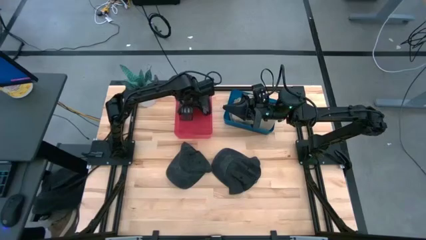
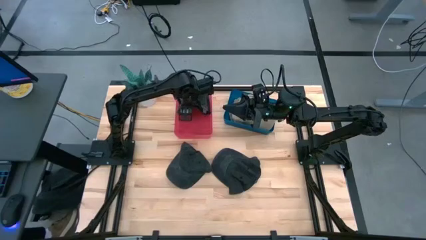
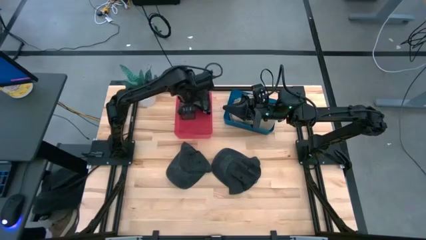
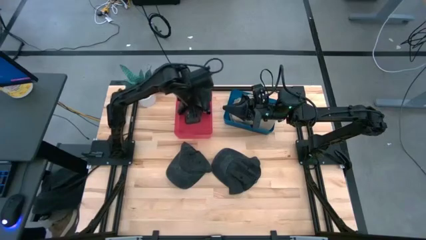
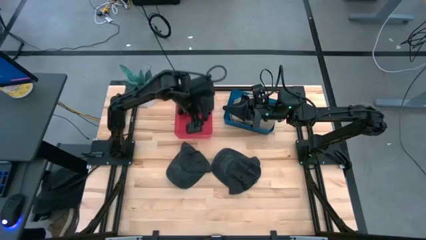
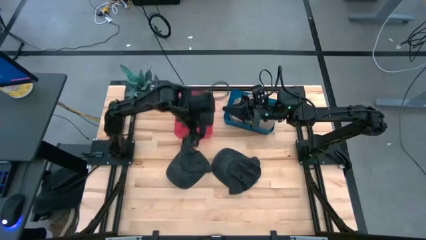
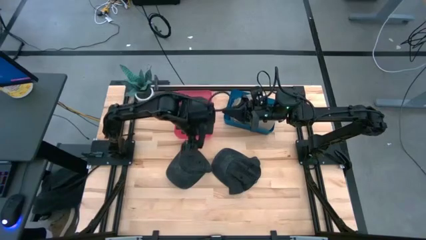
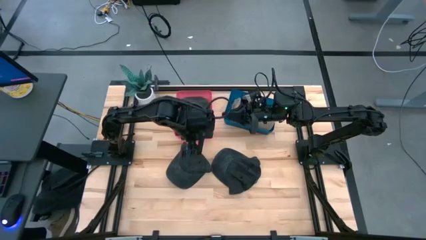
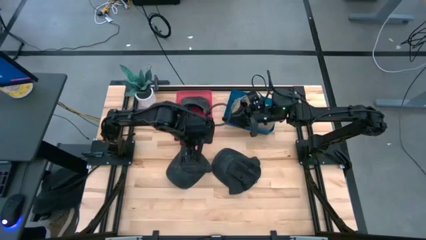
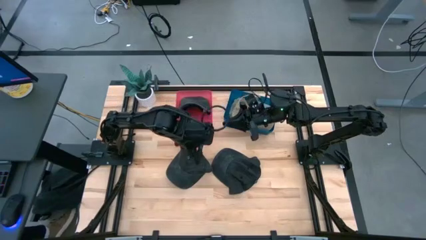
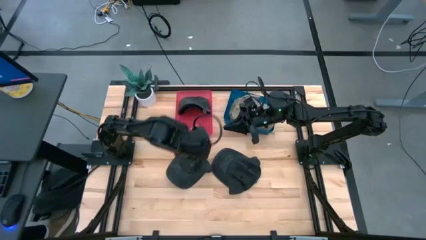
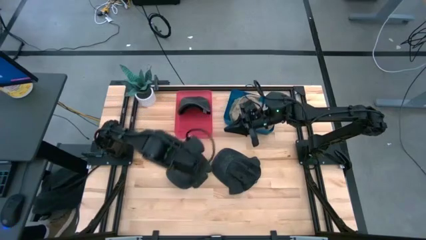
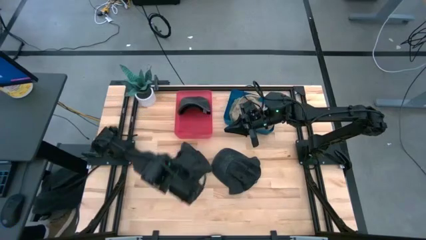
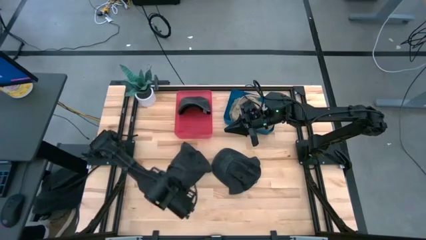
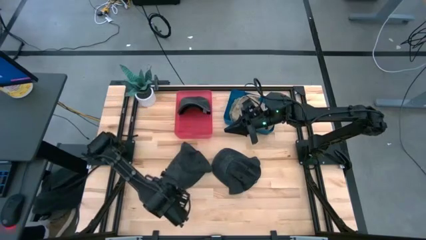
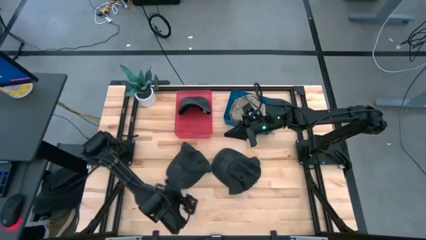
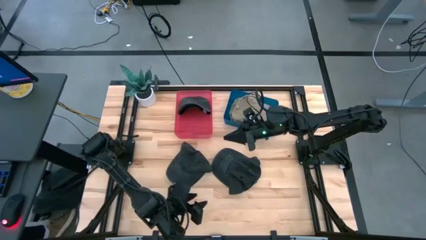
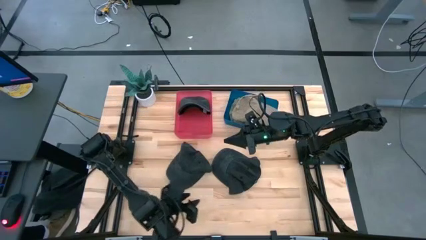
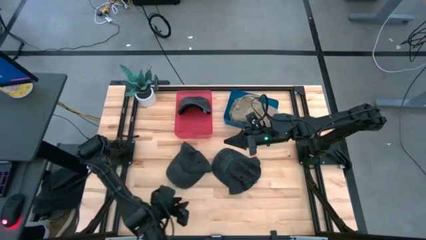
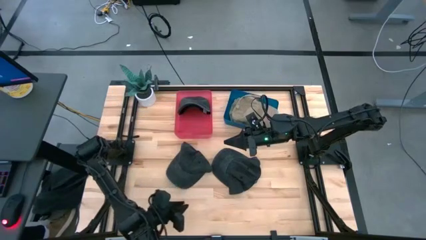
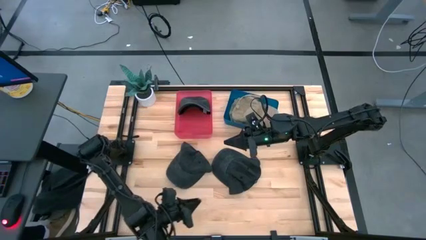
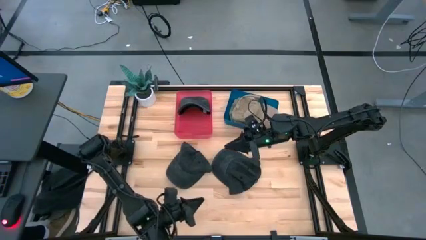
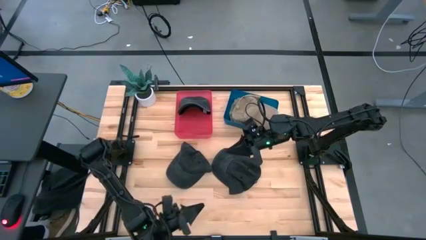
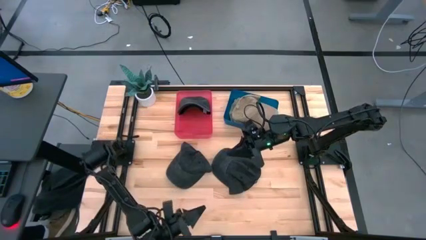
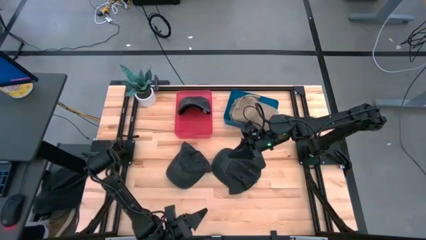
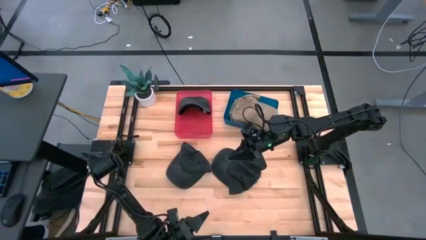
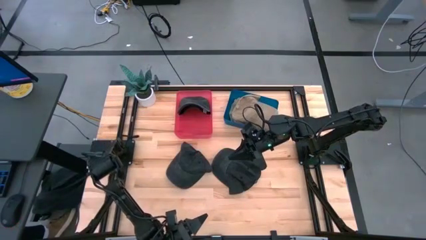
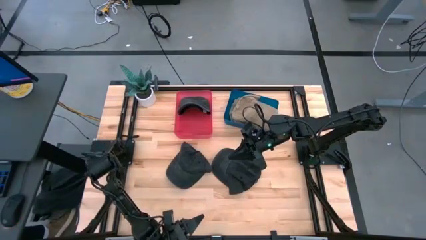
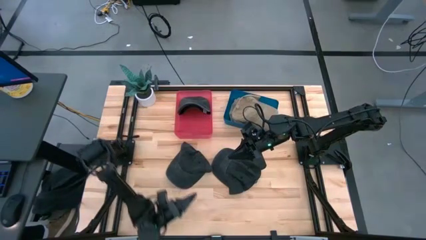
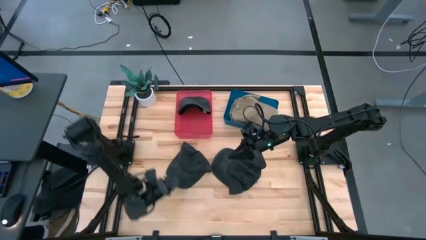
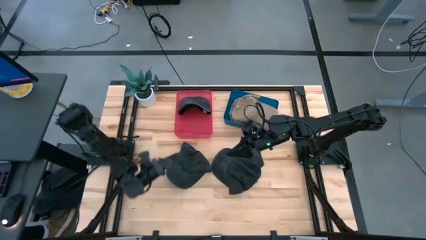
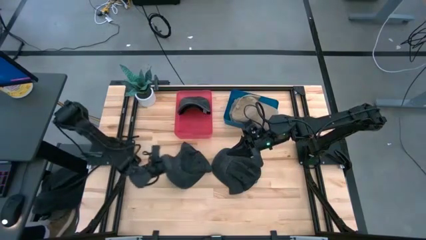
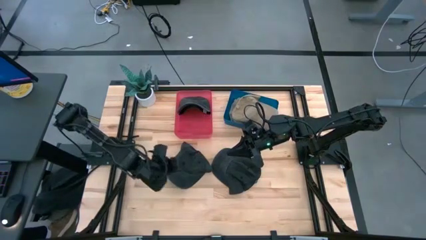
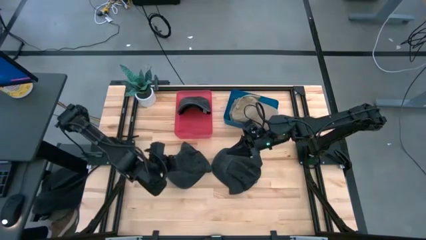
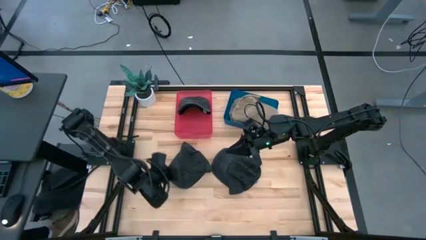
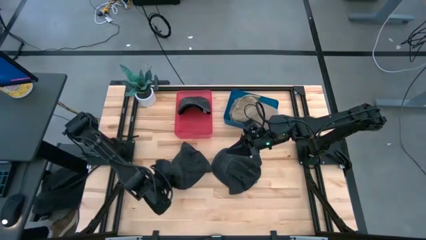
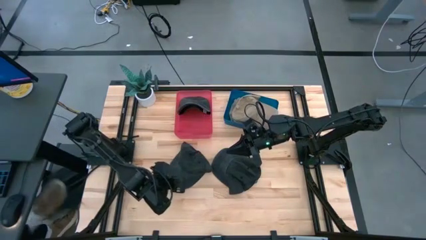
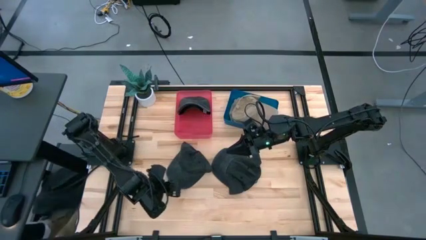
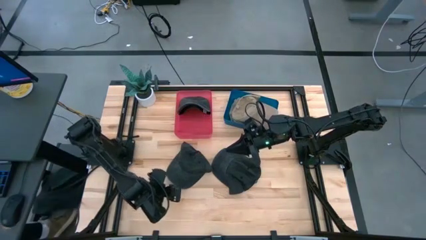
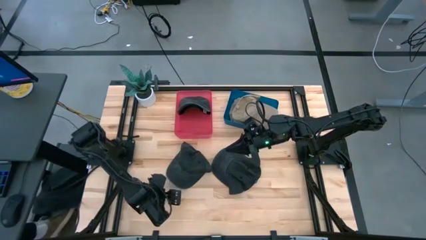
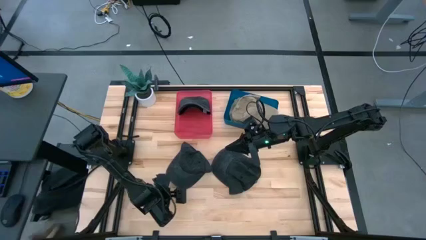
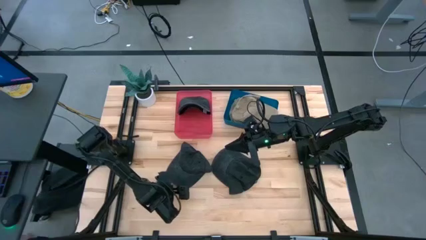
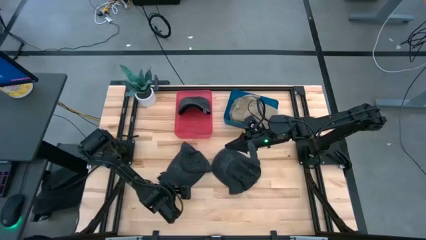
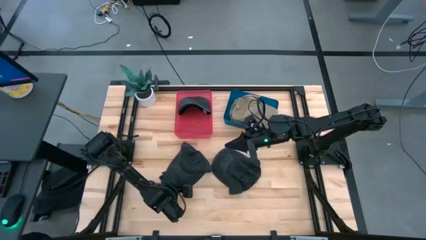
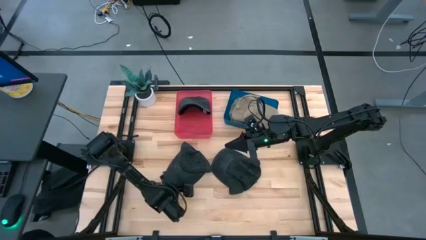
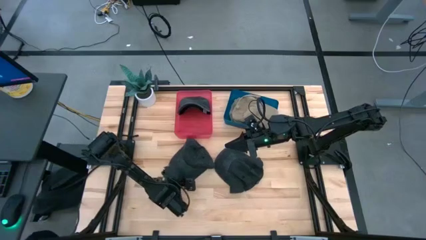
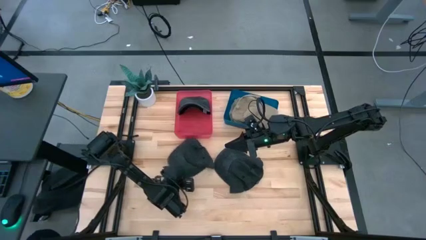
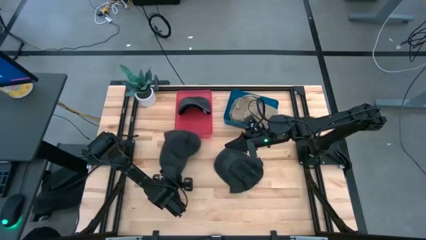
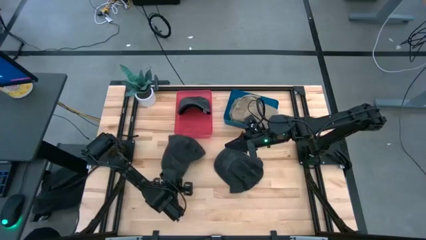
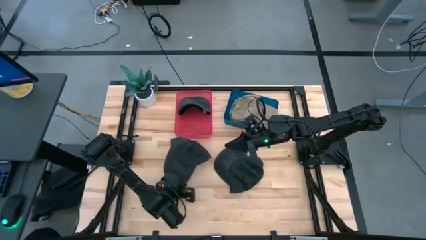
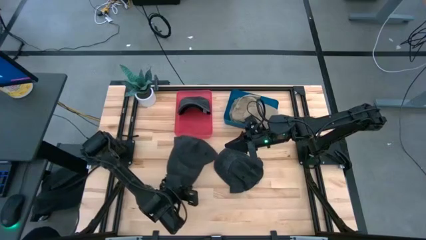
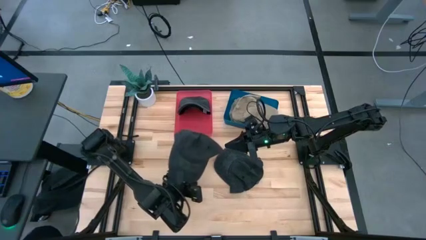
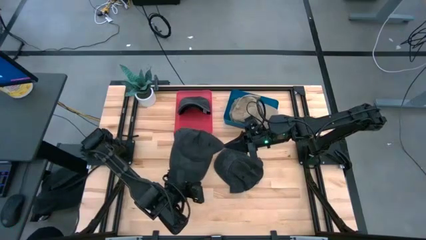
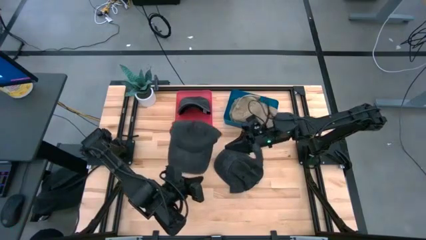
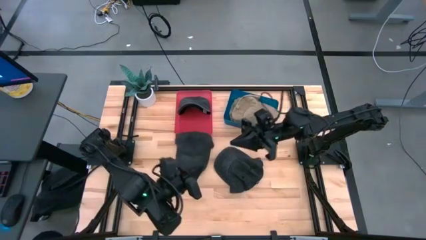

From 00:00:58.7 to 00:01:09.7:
Task: Pick & Place hat
Put the left black cap into the blue bin

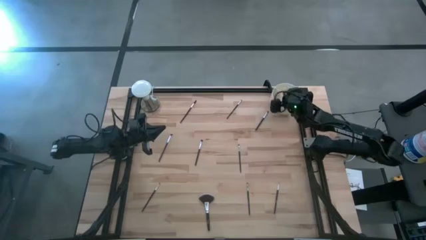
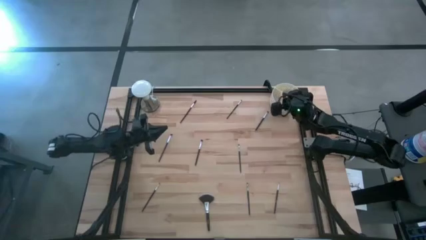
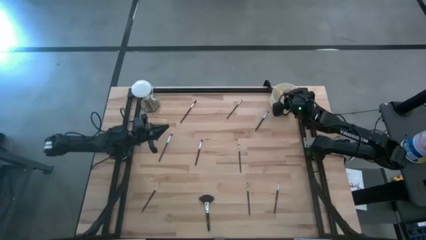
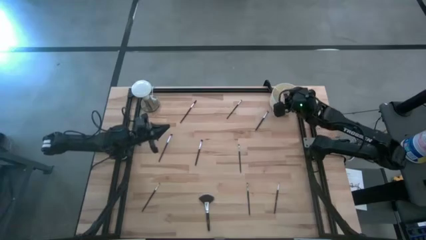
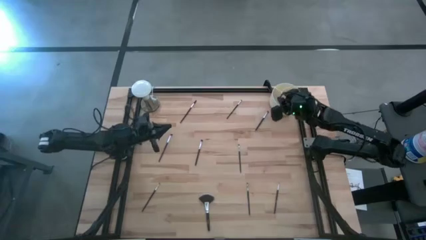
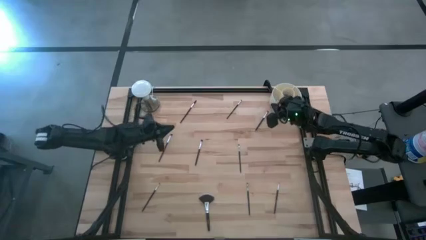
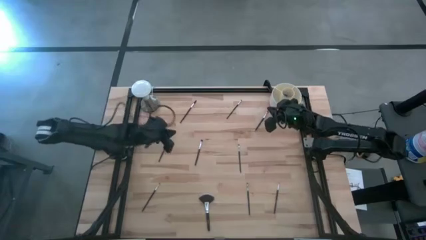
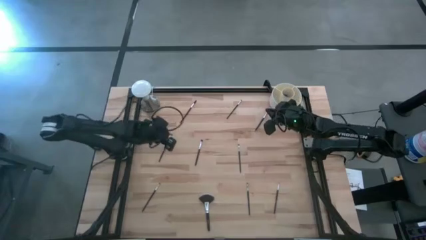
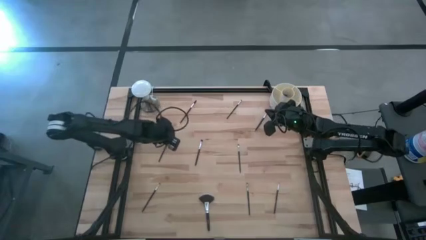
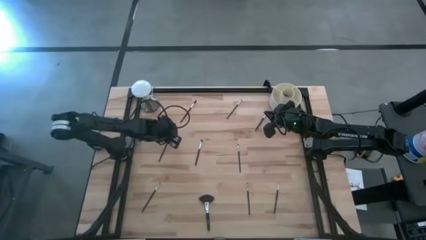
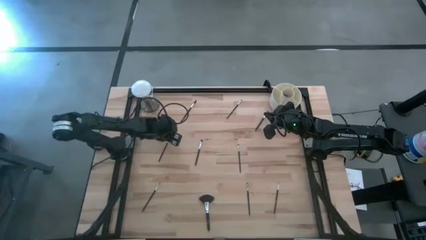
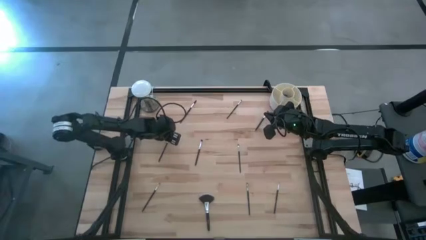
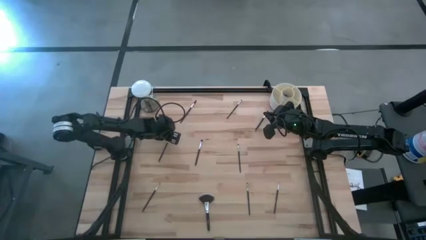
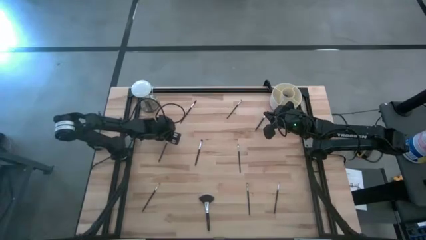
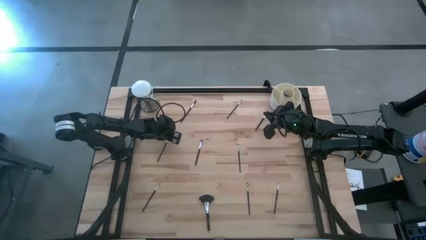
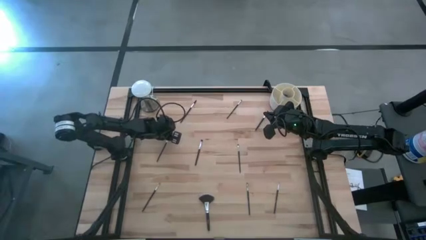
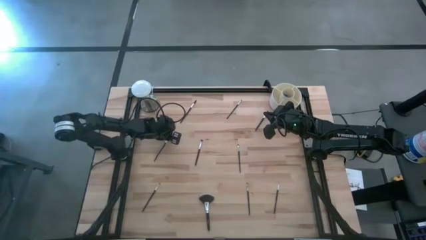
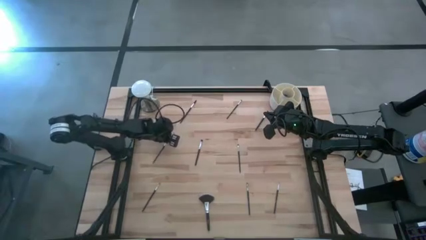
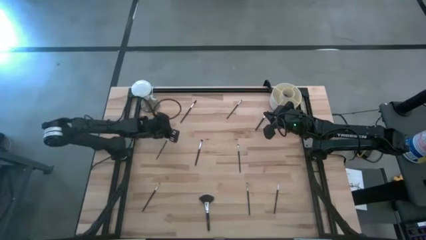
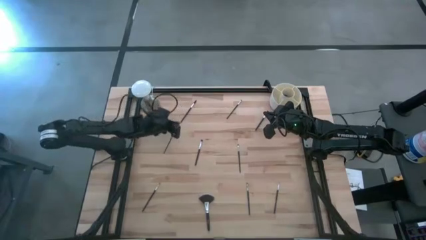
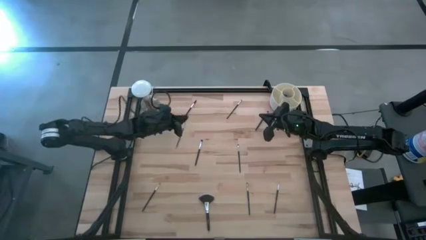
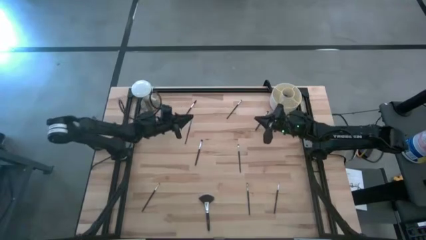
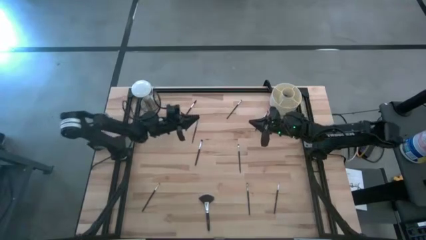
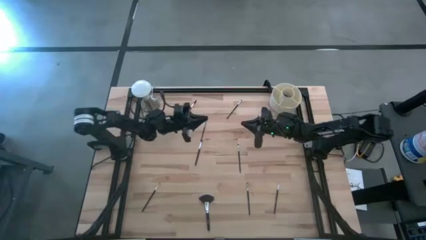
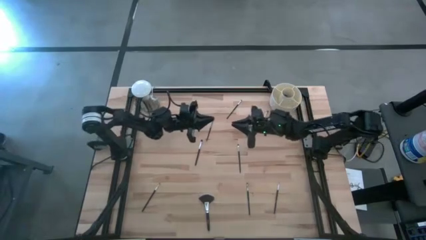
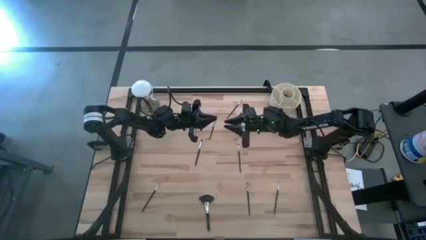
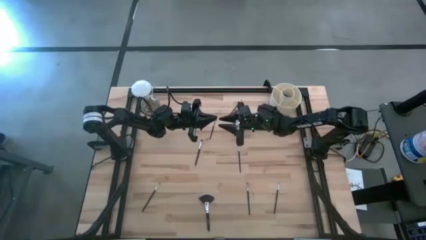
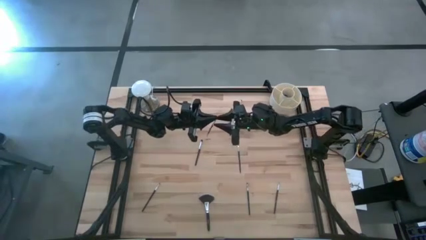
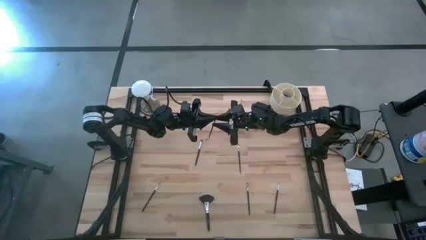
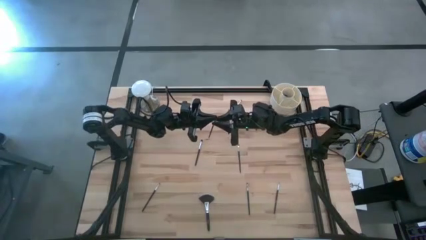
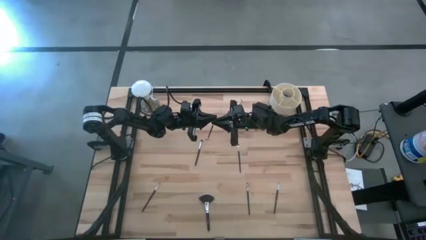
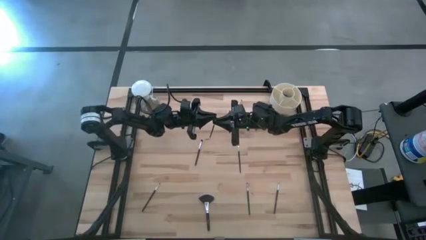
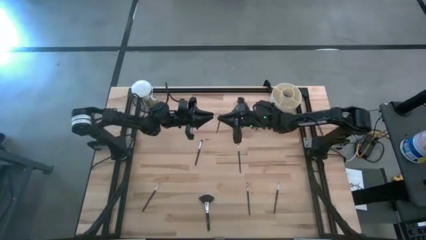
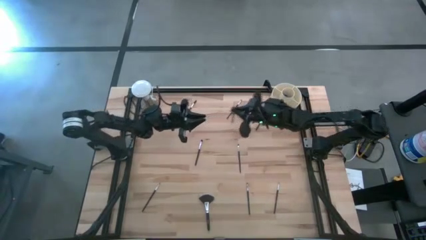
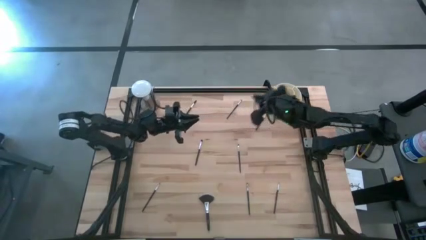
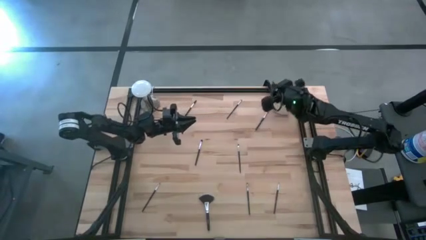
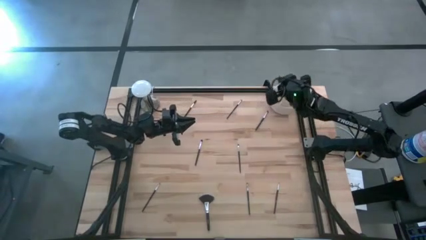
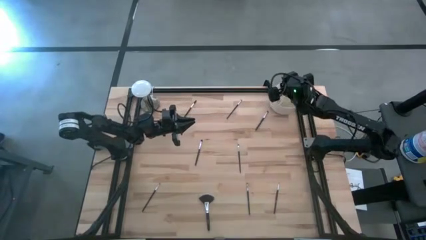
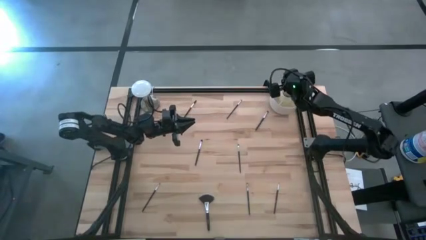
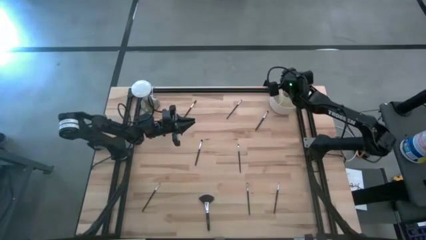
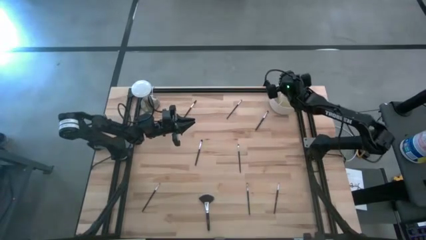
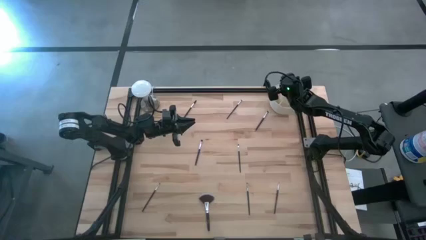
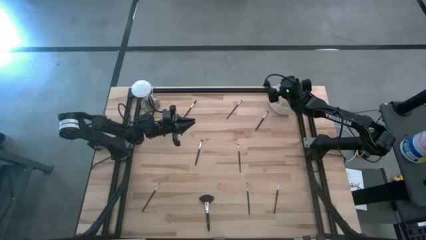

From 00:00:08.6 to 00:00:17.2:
Task: Pick & Place Makeup Brushes
Put the black blush brush into the white makeup holder
